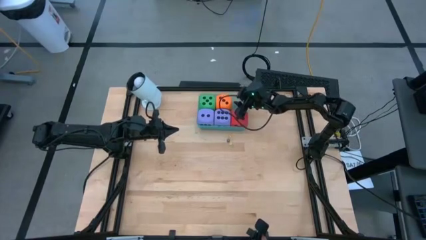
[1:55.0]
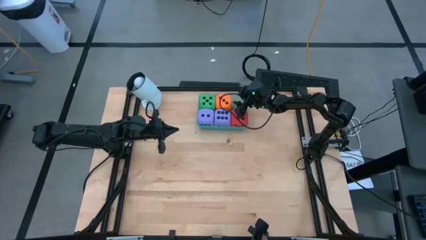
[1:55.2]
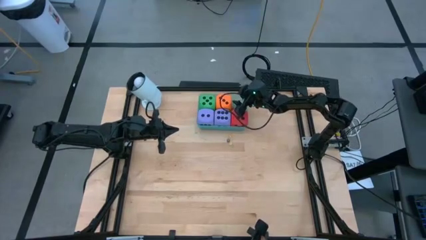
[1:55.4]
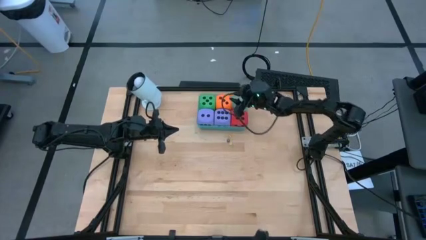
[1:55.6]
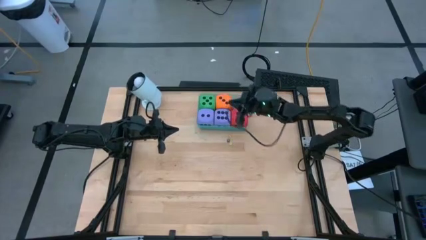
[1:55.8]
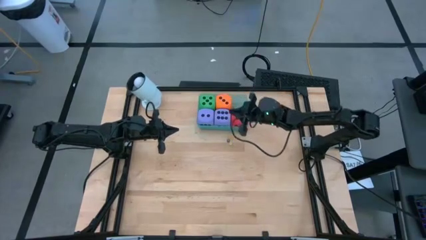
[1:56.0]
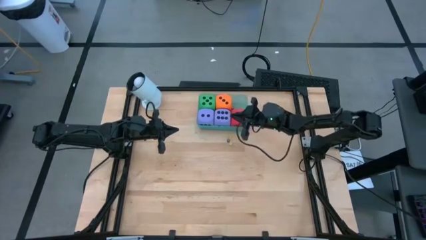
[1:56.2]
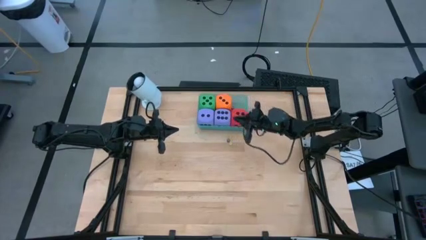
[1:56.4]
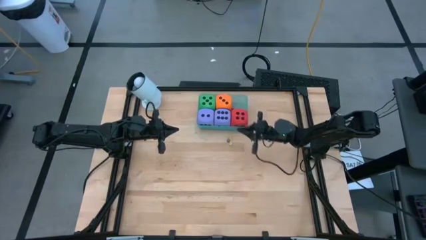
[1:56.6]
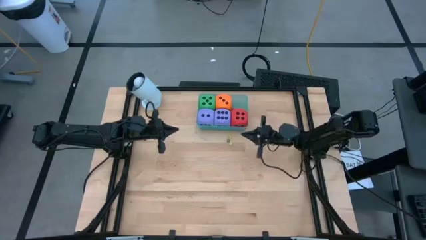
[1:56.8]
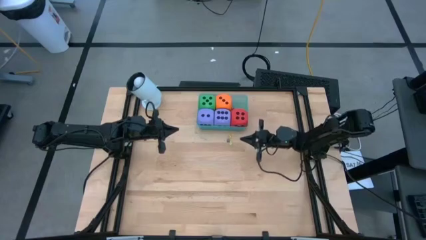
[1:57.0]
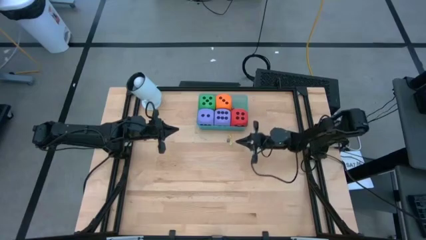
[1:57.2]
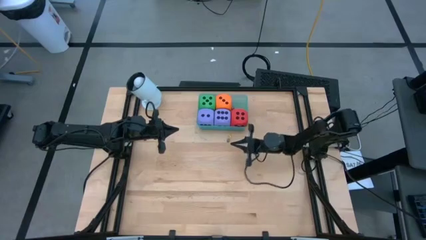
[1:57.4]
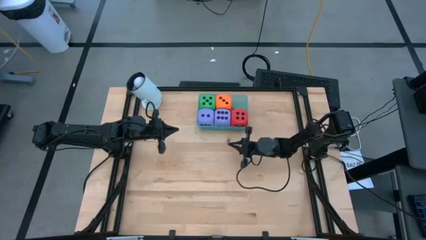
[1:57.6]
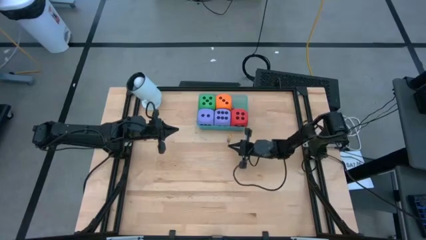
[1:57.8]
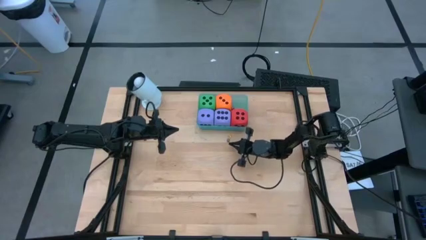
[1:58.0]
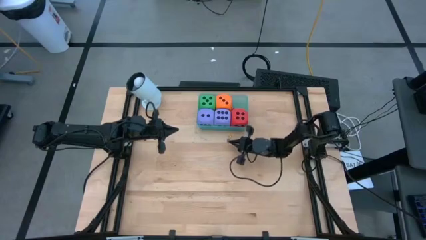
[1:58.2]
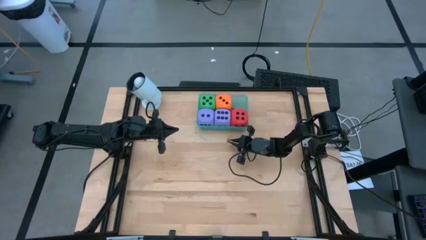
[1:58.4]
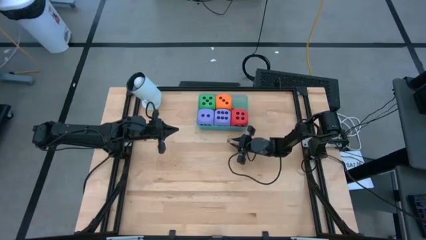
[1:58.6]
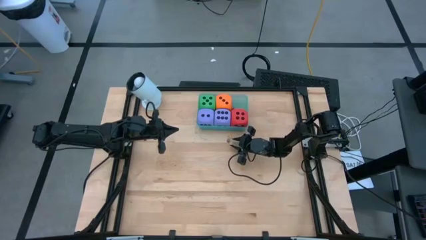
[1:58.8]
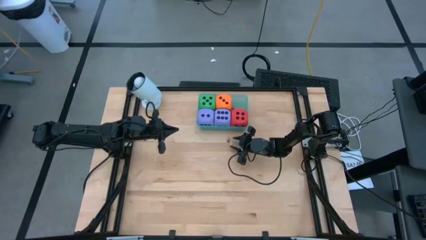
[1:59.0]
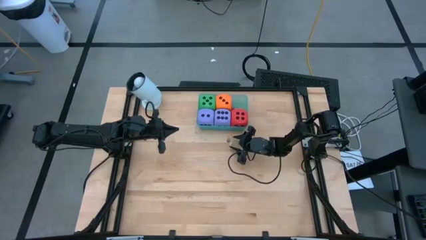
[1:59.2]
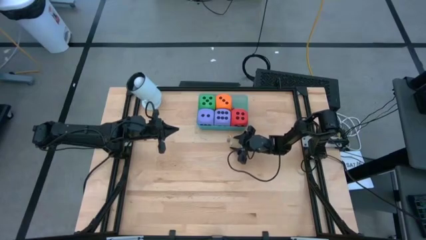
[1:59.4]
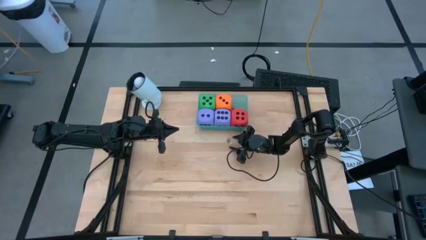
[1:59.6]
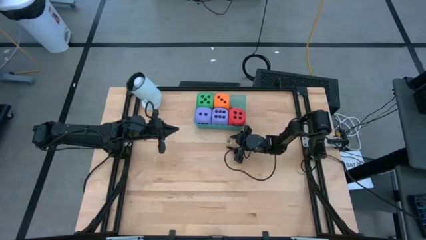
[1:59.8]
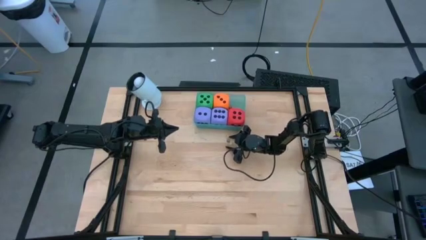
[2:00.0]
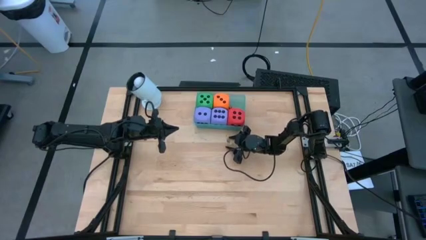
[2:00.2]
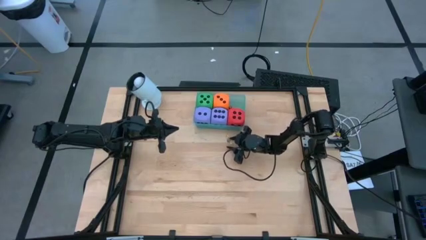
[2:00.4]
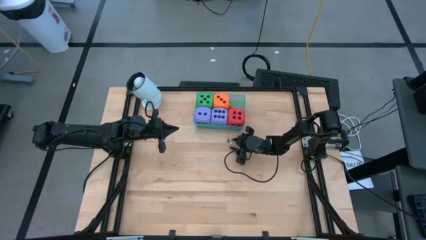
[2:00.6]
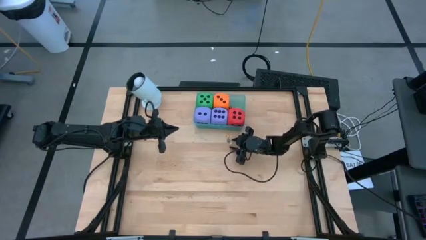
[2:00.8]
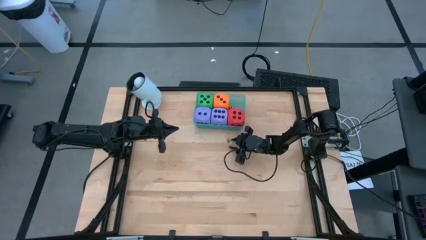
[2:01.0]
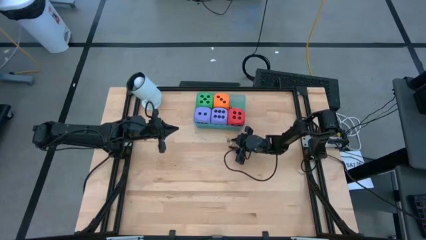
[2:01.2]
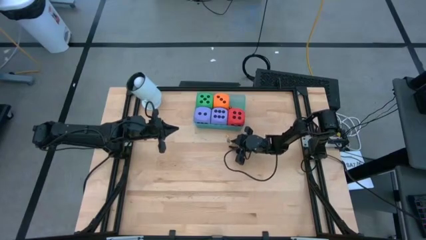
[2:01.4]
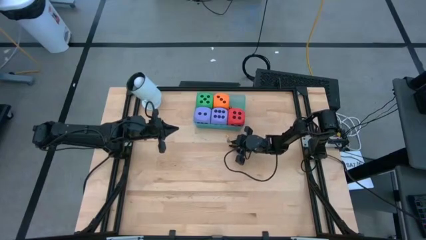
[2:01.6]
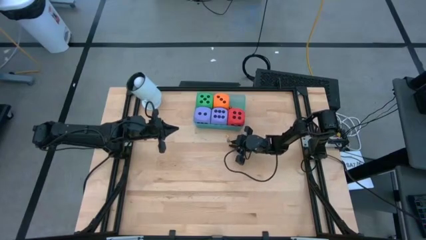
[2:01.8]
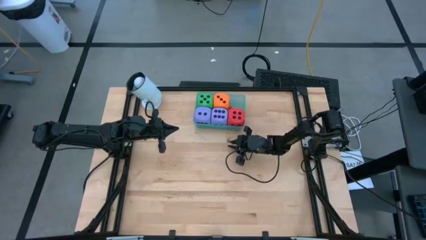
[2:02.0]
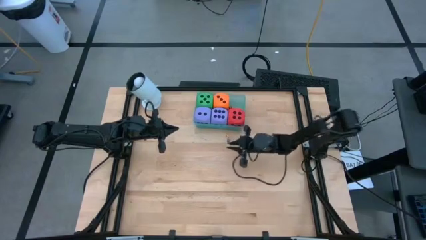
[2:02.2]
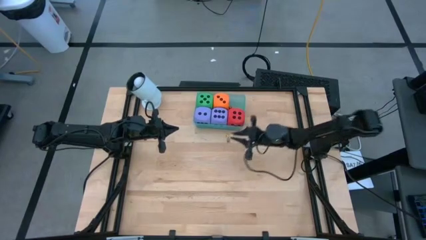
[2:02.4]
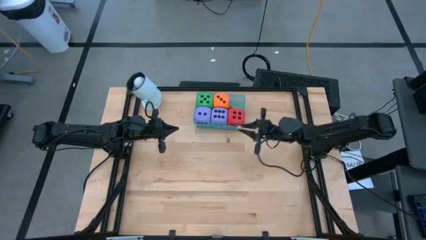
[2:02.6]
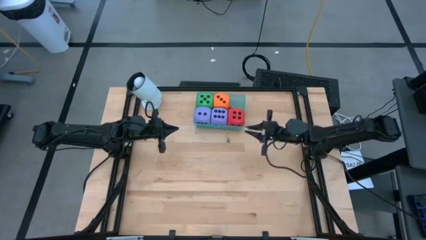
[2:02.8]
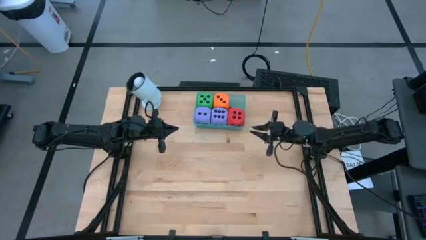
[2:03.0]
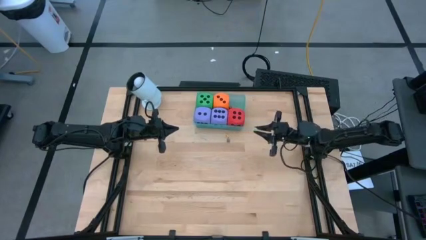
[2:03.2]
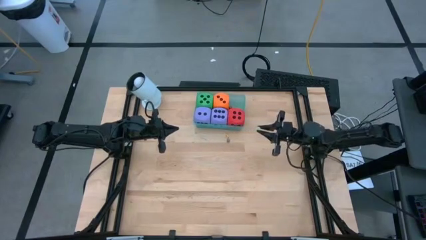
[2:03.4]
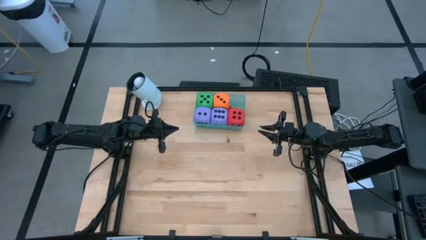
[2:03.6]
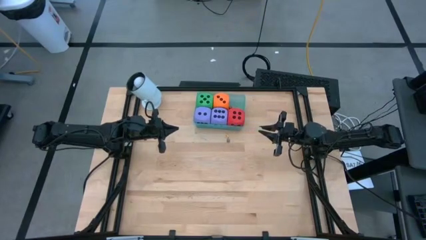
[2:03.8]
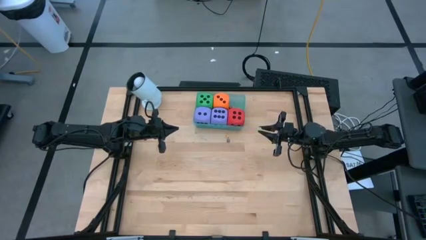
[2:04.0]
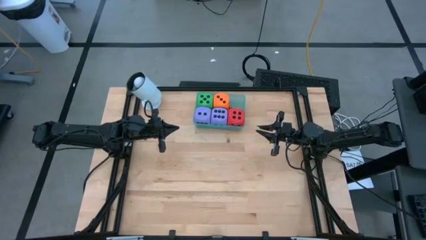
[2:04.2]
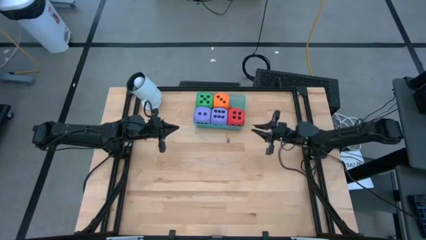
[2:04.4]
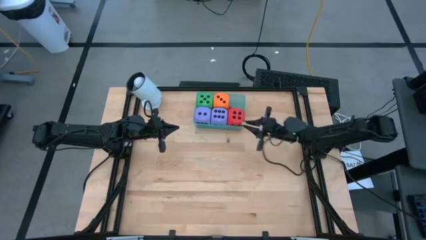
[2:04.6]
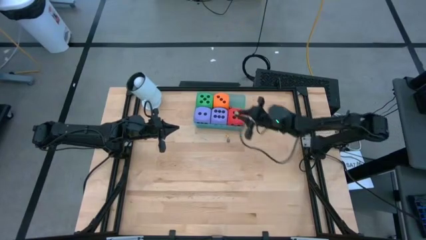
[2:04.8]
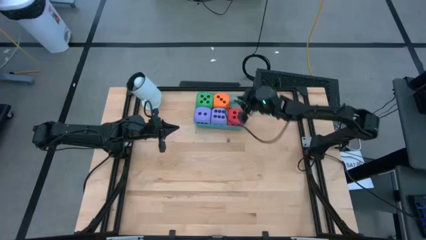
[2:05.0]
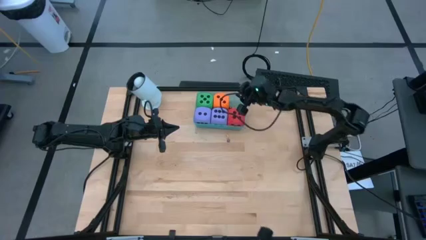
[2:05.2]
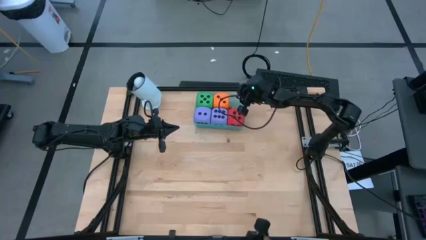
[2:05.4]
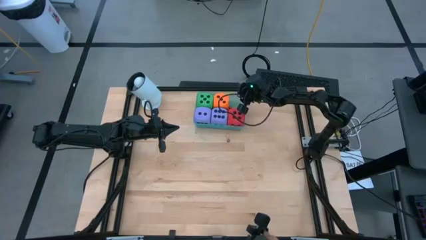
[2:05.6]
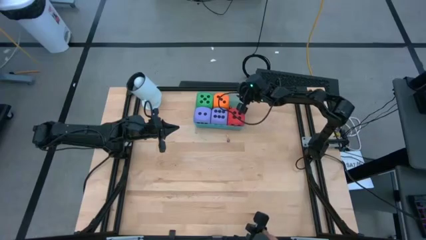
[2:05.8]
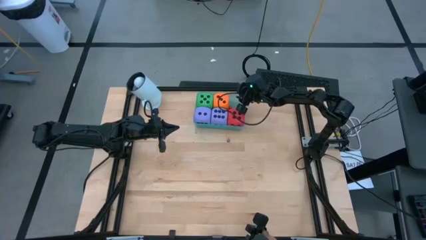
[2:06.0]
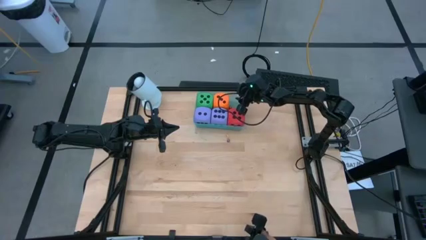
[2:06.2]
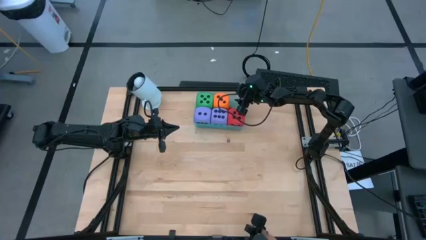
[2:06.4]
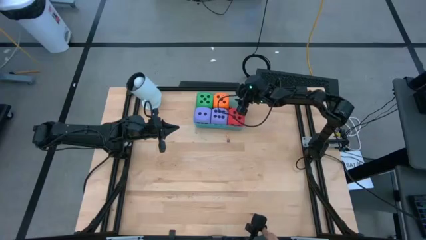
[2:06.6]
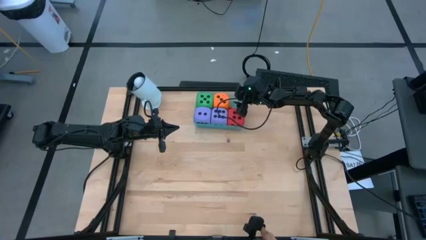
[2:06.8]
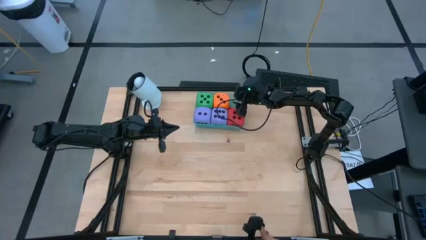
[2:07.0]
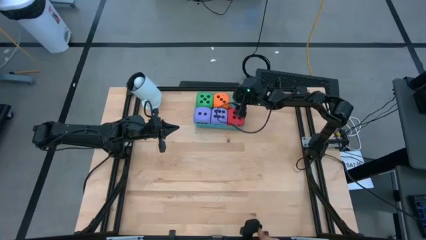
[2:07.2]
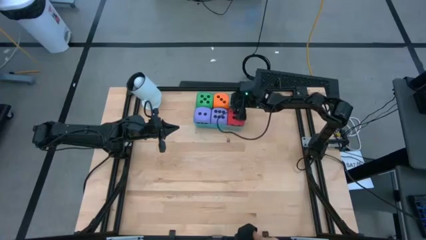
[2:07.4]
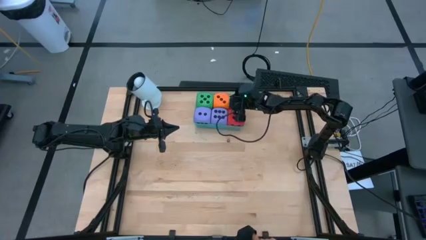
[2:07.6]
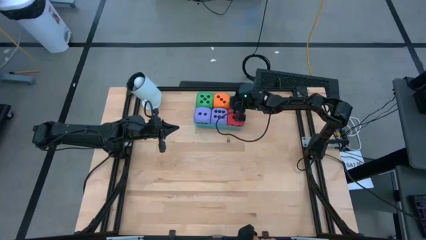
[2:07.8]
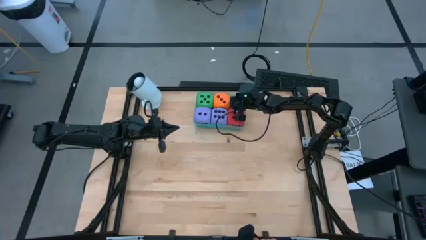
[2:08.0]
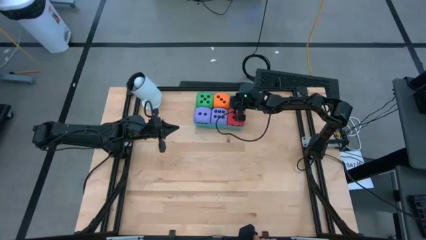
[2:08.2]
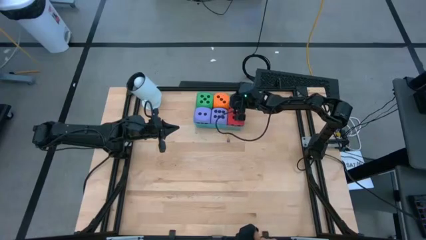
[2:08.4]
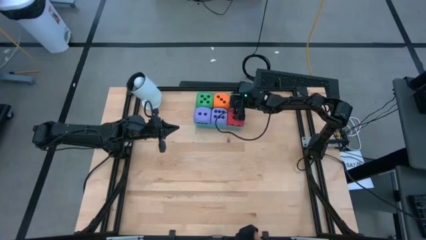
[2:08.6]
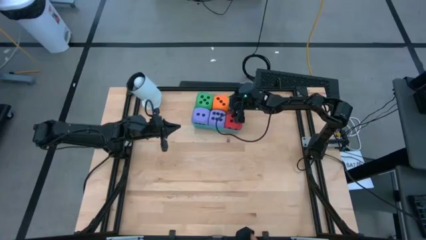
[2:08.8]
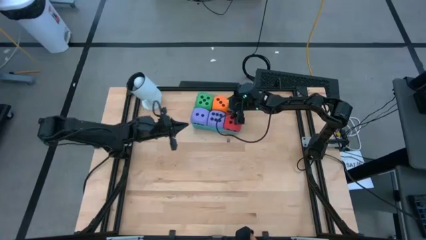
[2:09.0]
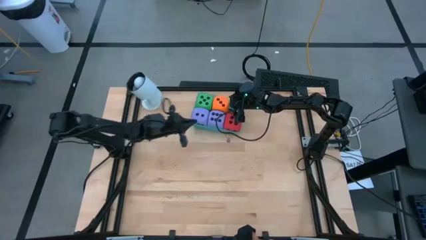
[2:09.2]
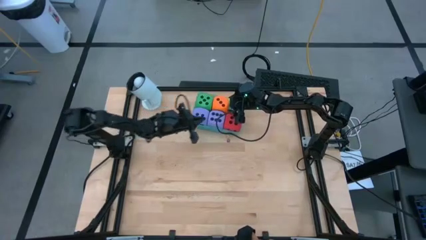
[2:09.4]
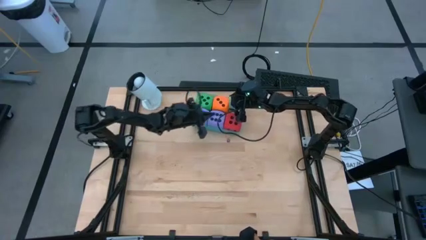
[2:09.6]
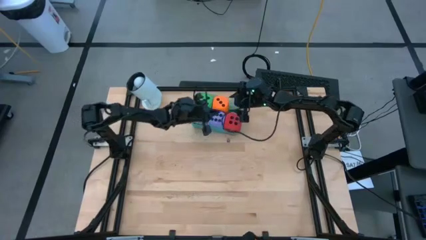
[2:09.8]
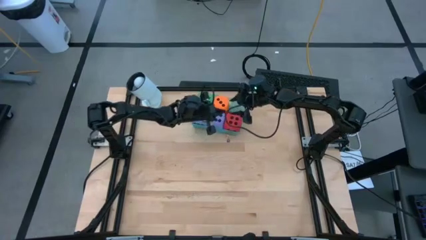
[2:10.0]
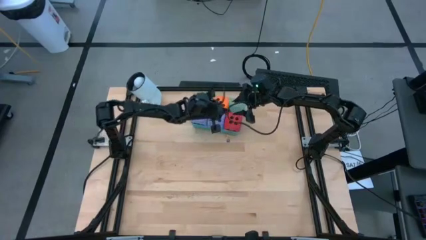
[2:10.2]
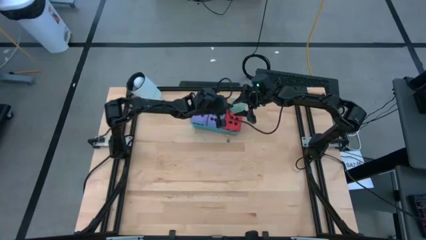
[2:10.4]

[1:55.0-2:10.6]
Task: Pick & Place Dice
Put the small green dice into the green container

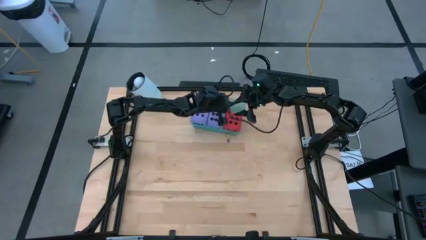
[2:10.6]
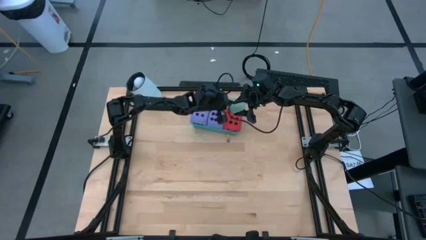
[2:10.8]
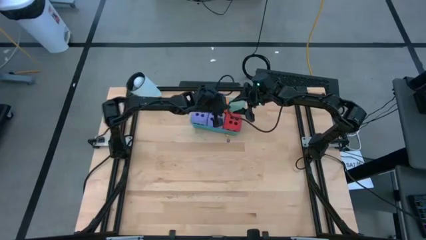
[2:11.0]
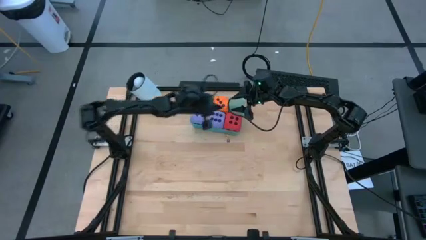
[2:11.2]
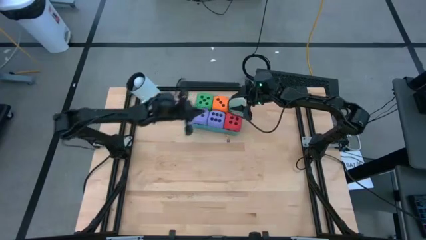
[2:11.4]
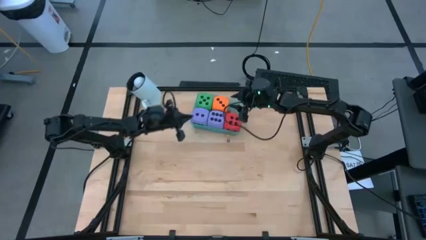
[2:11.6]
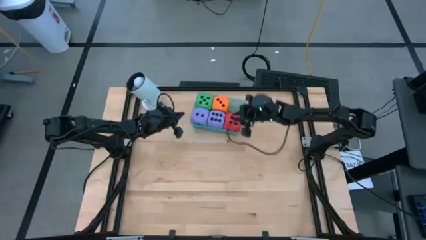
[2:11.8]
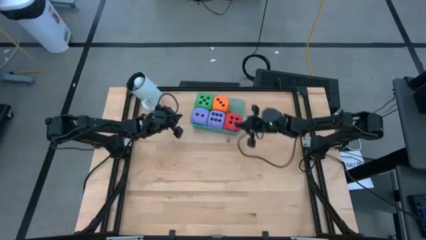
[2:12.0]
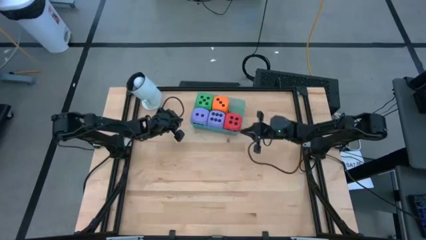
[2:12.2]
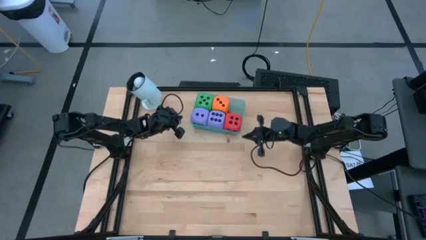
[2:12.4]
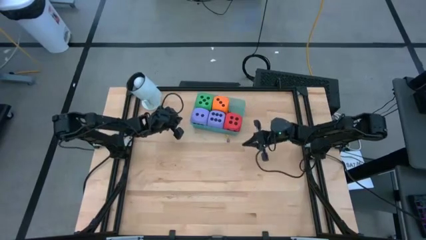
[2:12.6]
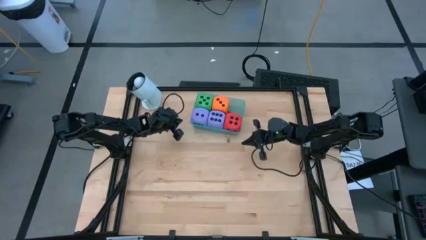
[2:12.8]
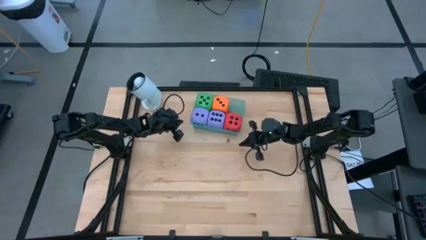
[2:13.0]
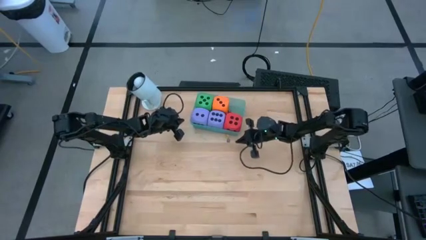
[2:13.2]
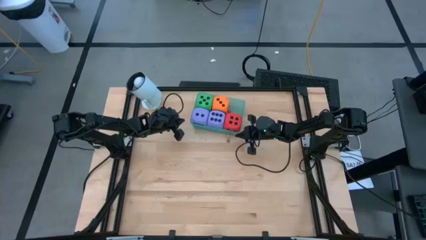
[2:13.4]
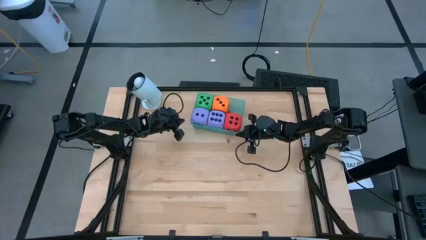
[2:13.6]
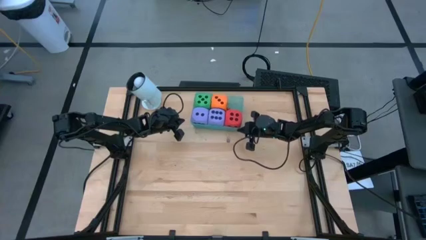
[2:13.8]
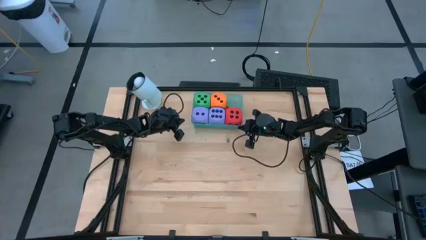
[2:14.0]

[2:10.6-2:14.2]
Adjust the blue bin
